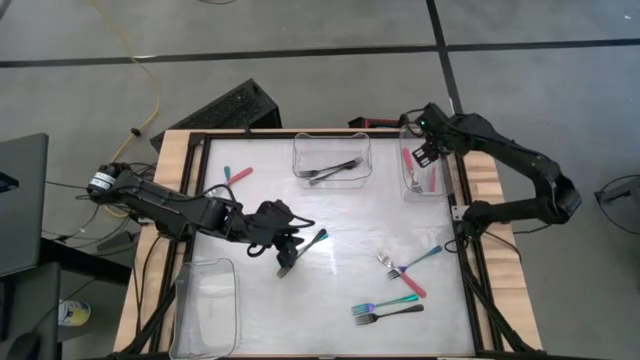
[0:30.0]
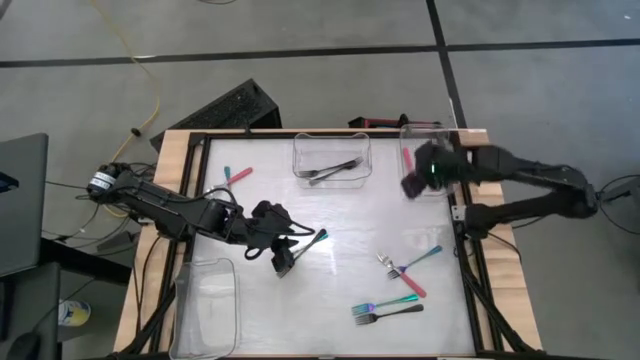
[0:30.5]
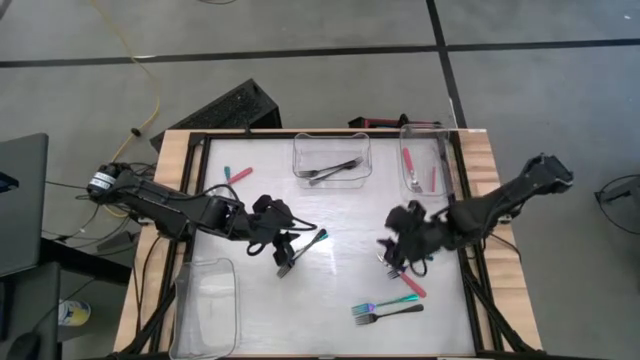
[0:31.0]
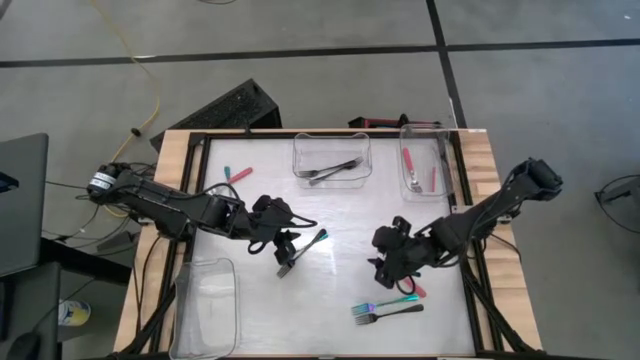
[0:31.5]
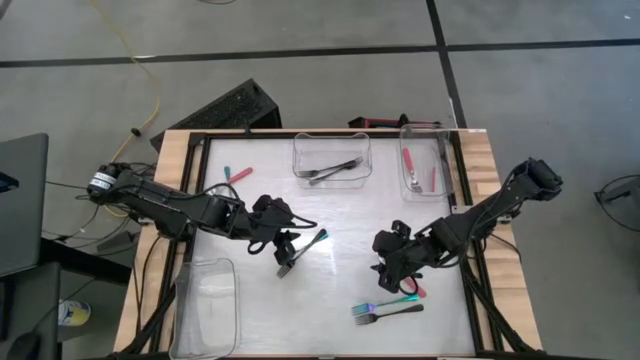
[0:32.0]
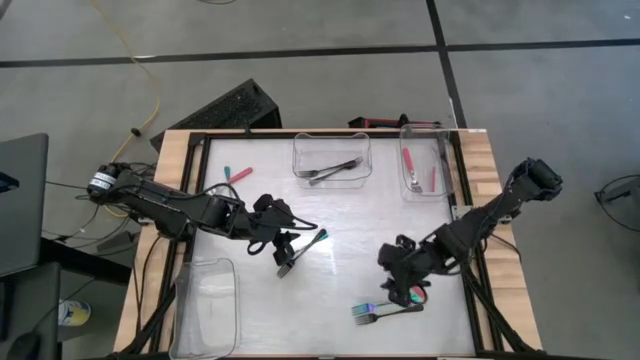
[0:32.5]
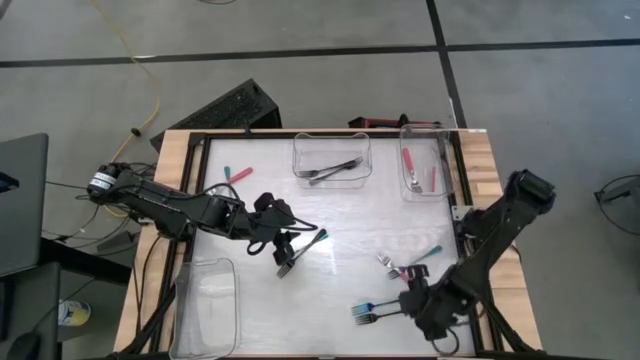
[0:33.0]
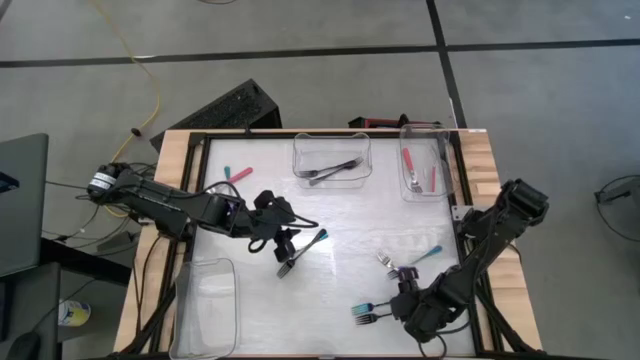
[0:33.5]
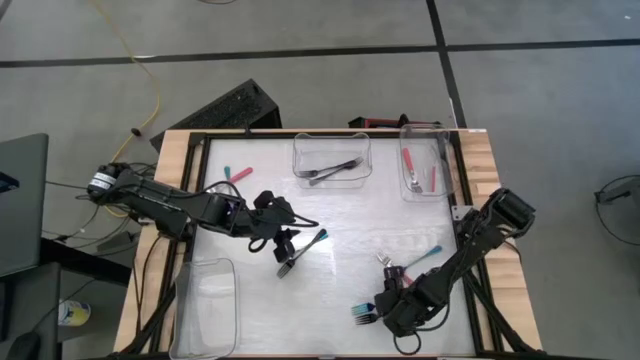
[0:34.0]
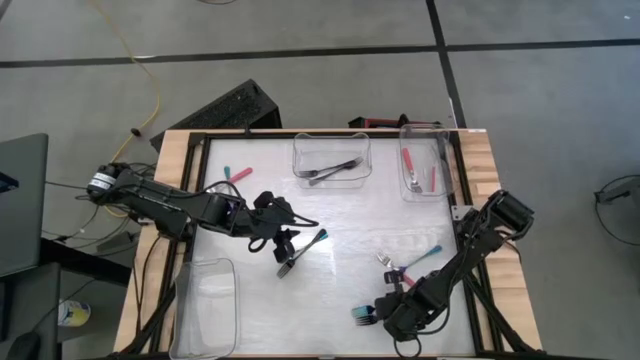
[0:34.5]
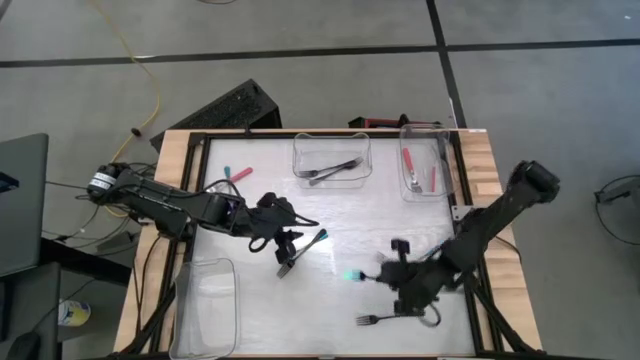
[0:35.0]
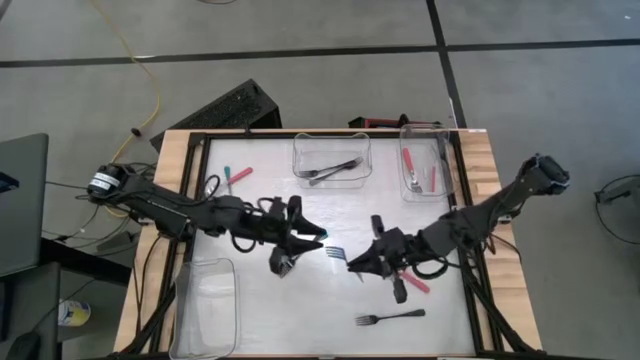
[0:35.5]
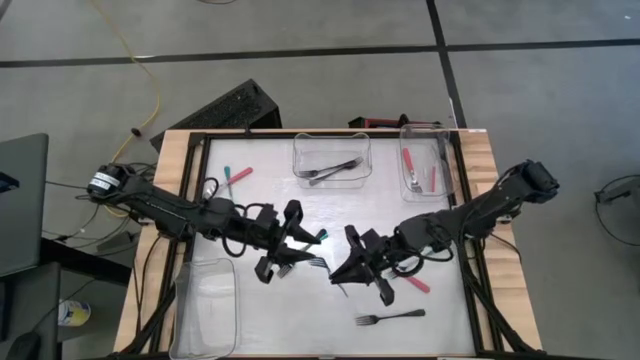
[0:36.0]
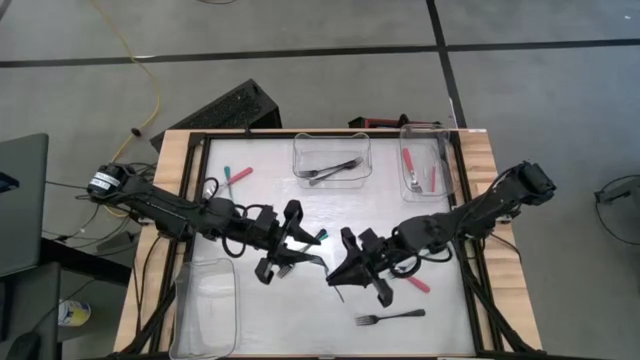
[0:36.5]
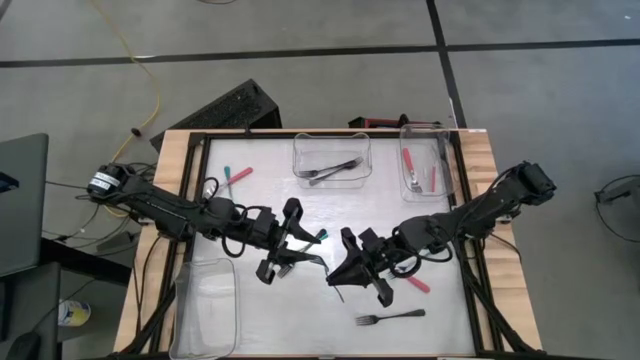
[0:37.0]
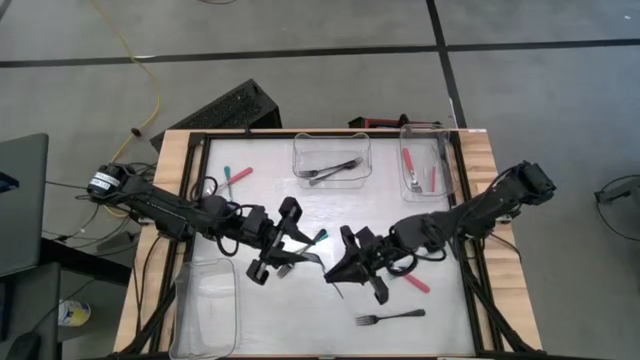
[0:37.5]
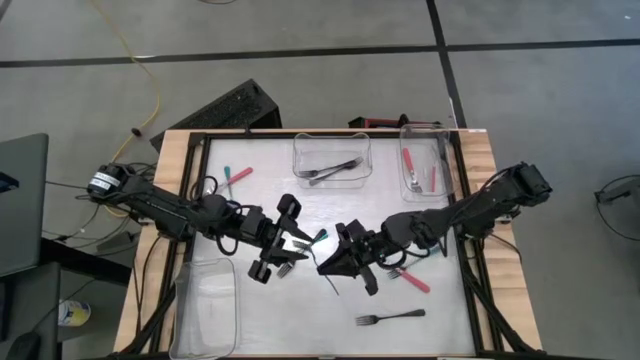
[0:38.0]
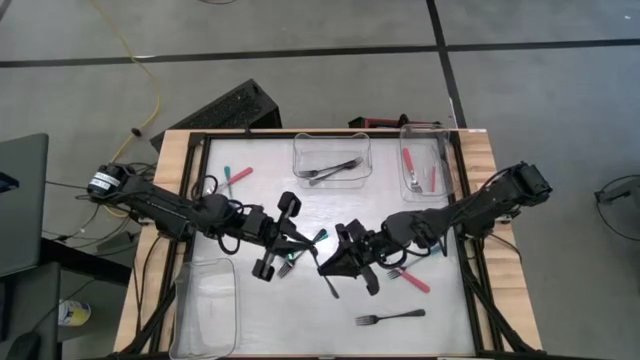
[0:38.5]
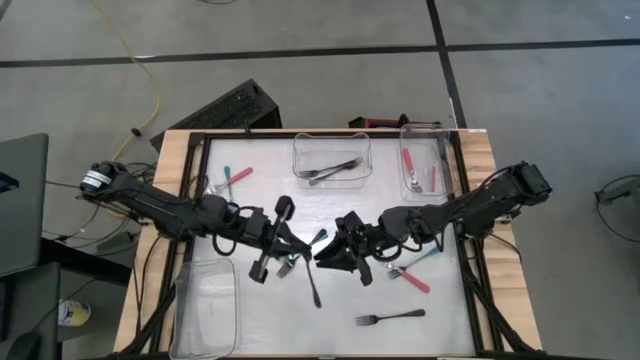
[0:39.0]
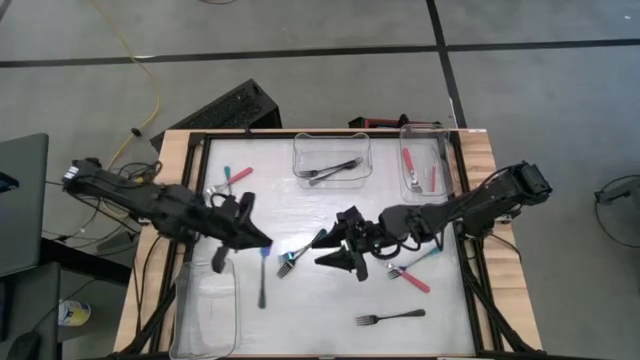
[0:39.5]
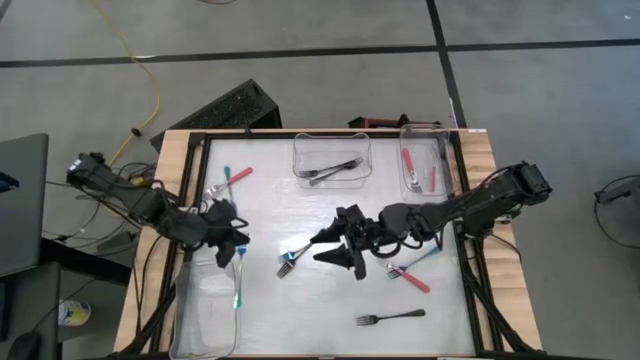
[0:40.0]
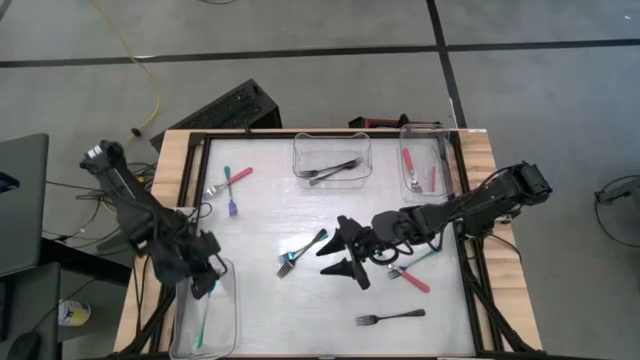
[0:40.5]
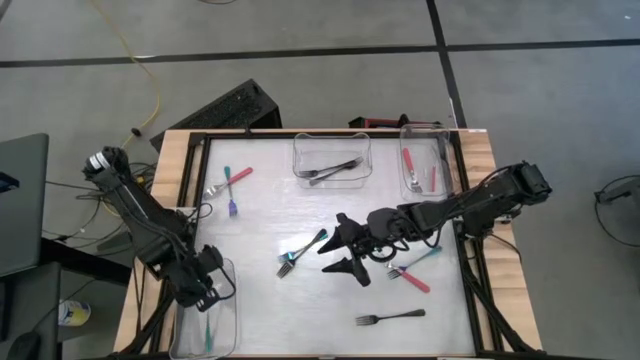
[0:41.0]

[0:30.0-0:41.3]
Task: Sort silverware by color (type)
Put the bottom left blue fork into the bottom left transparent bin

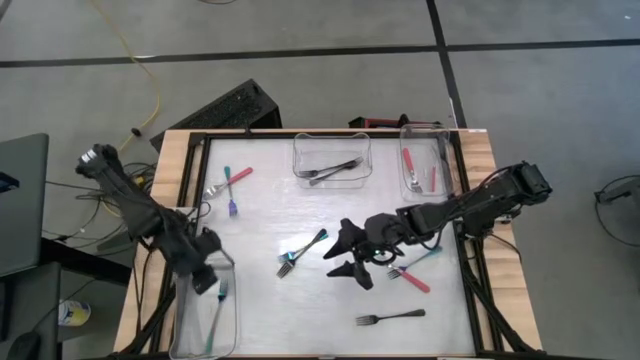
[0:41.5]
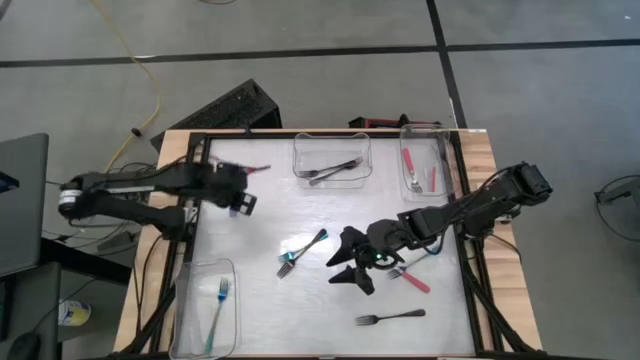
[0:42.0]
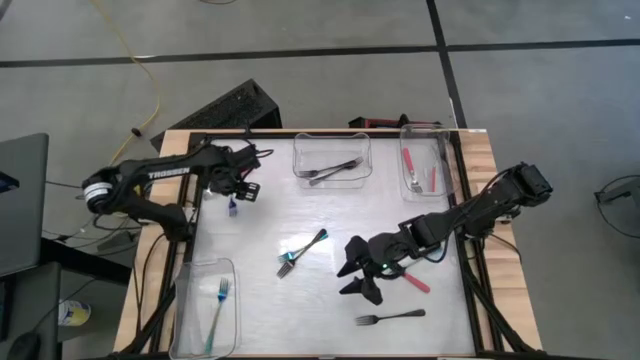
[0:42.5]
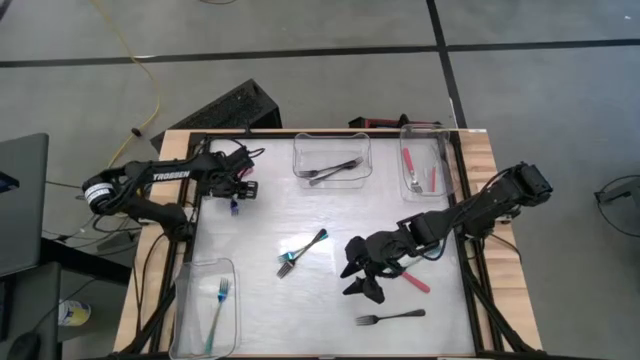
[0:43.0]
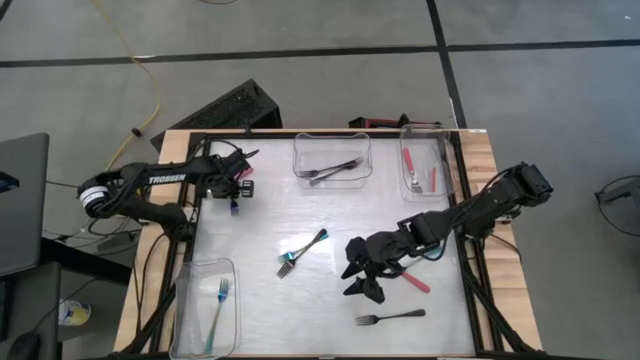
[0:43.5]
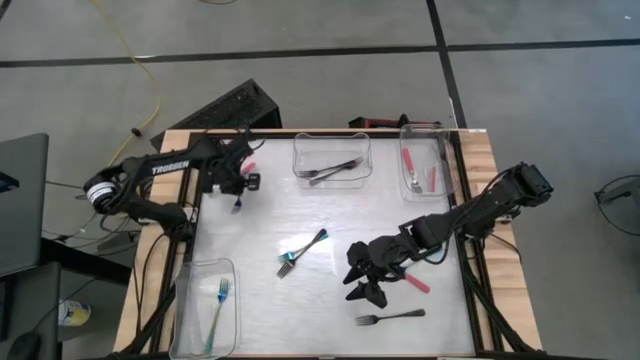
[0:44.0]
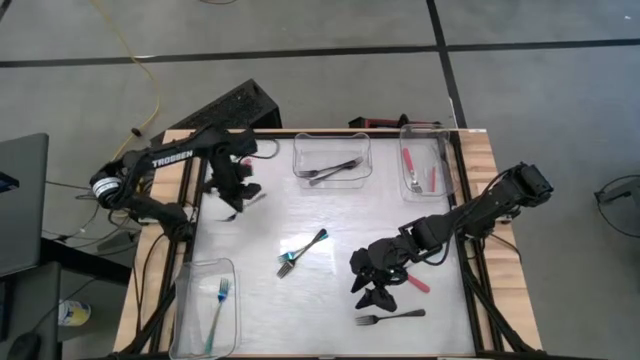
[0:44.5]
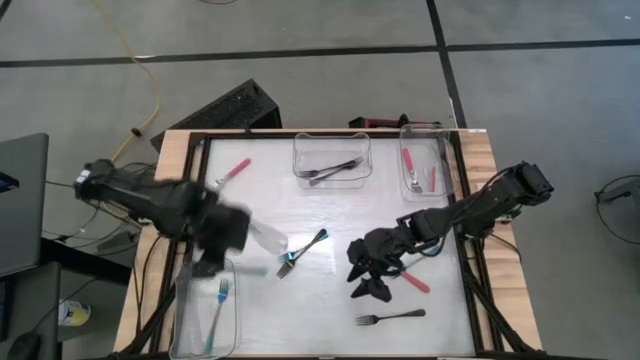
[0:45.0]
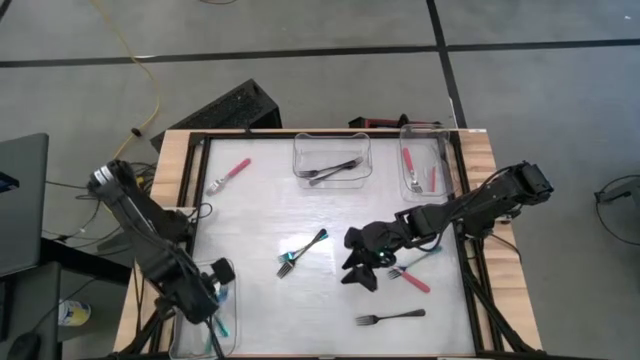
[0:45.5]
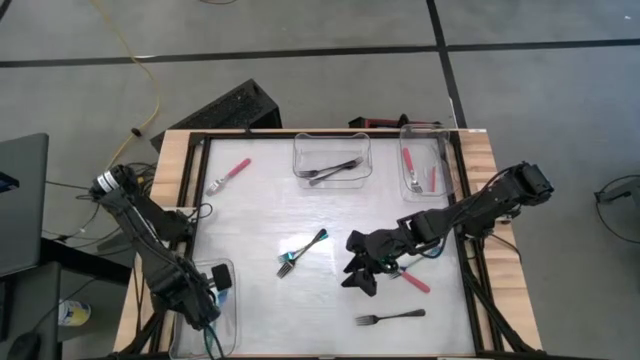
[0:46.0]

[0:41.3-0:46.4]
Put the top left blue fork into the bottom left transparent bin

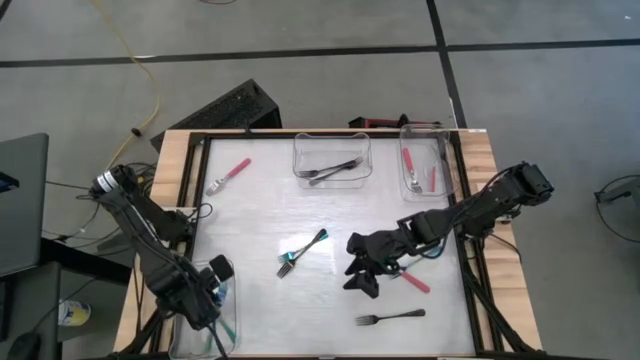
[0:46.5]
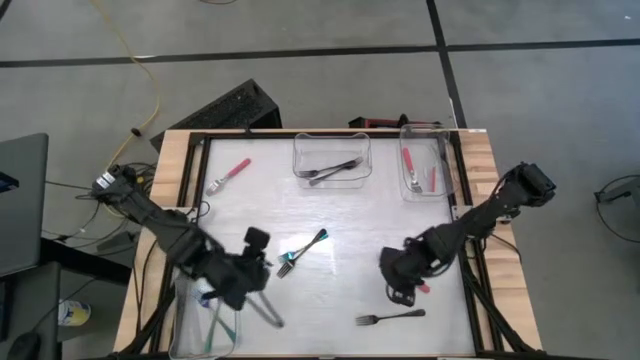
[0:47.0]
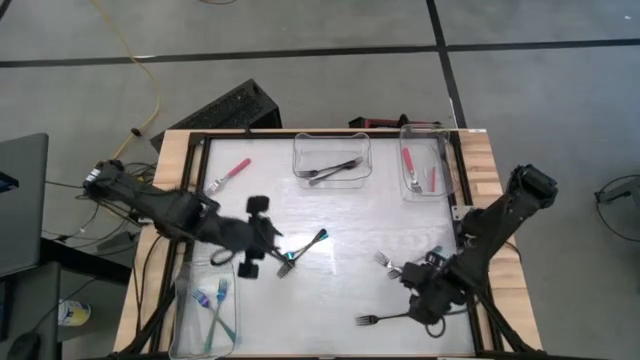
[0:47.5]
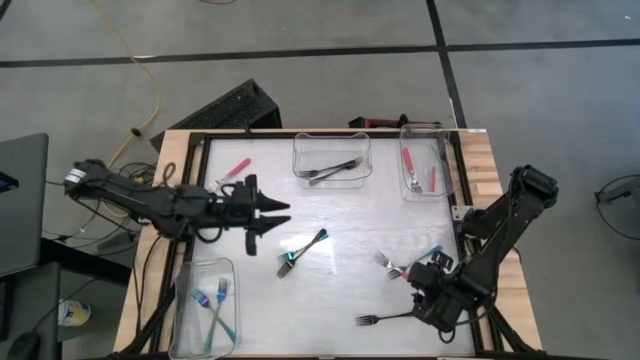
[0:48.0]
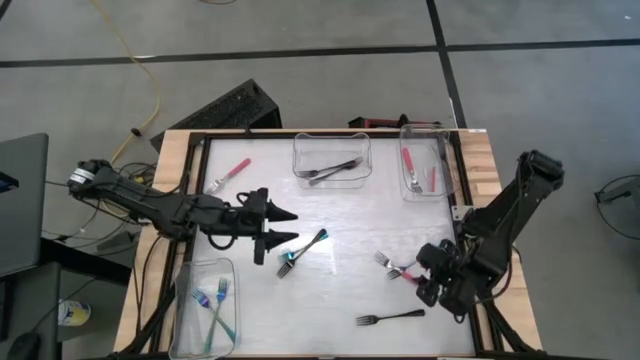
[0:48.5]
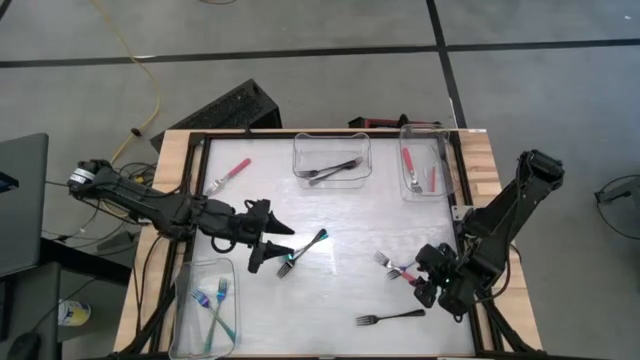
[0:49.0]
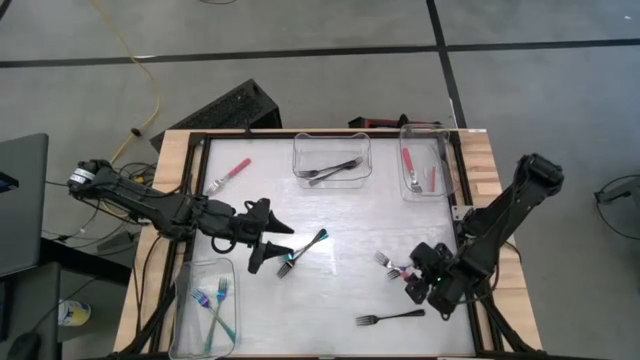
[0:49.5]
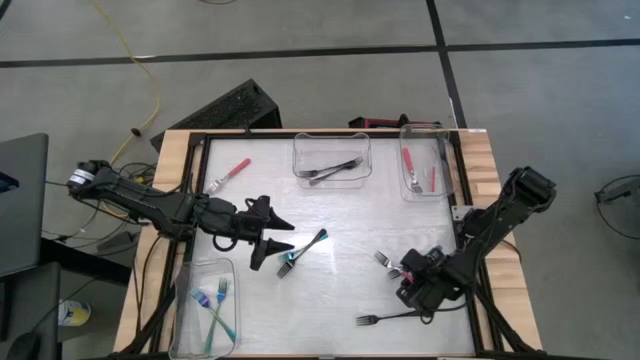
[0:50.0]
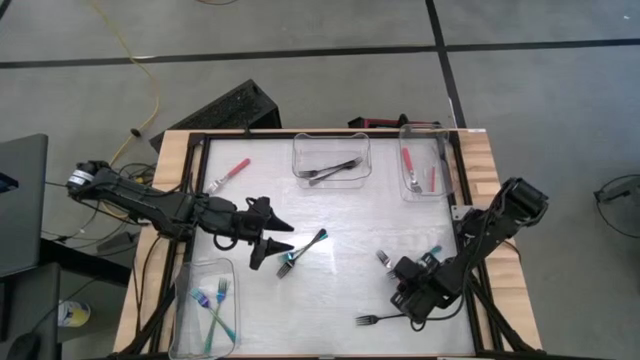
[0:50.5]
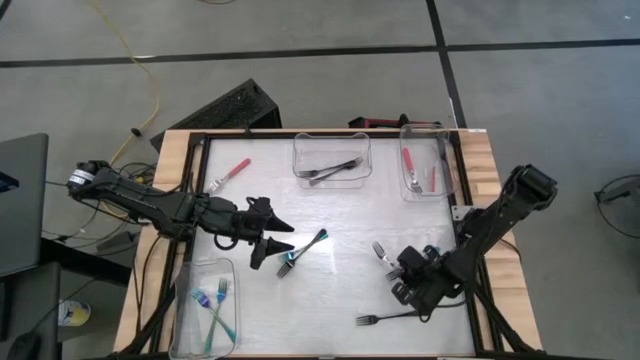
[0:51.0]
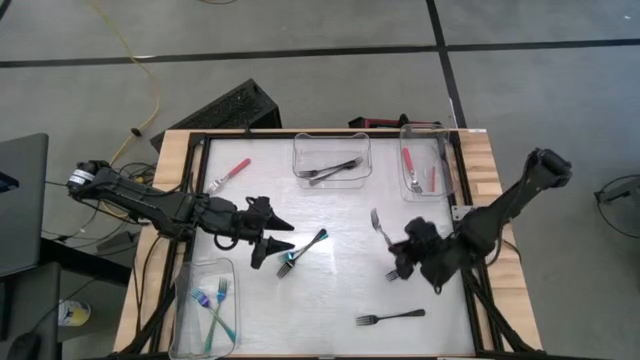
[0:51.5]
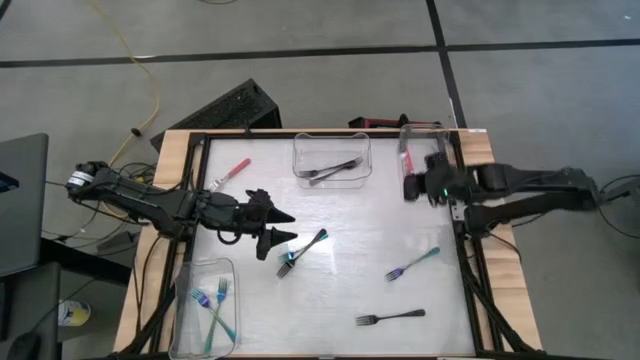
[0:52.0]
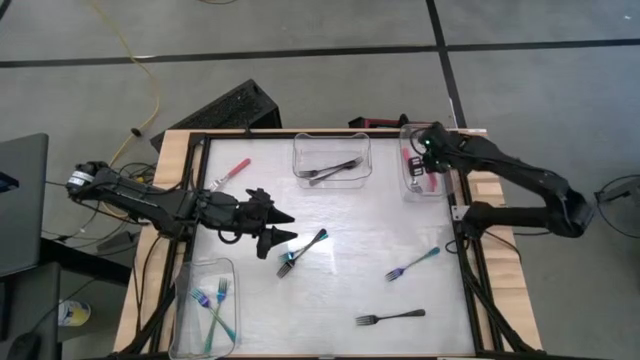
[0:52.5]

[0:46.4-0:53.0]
Put the bottom pink fork into the top right transparent bin
